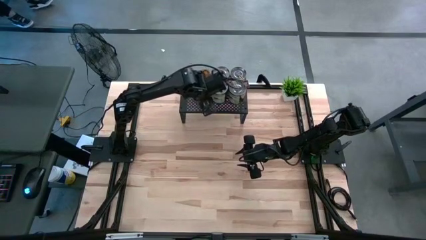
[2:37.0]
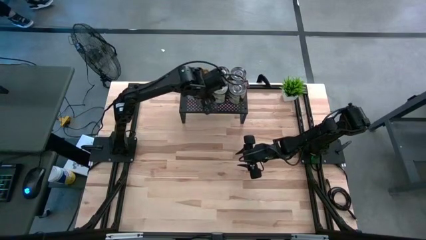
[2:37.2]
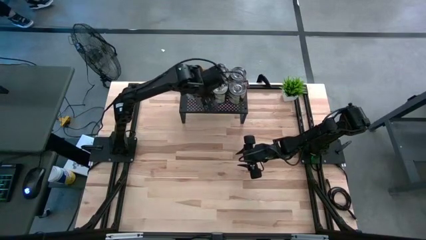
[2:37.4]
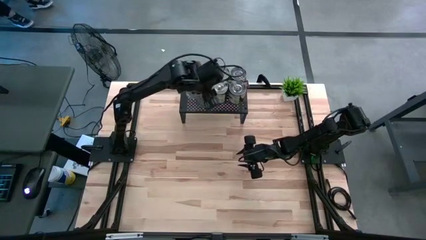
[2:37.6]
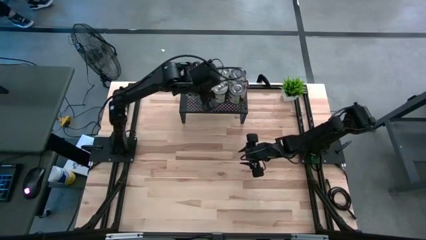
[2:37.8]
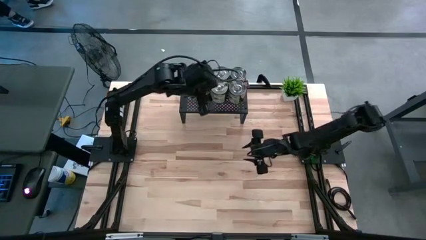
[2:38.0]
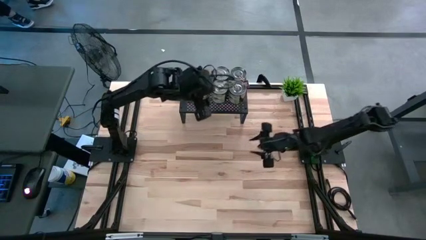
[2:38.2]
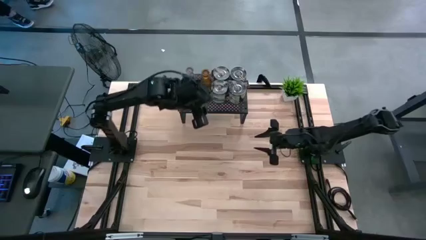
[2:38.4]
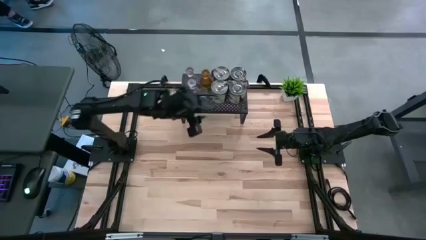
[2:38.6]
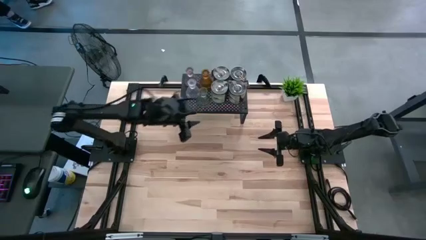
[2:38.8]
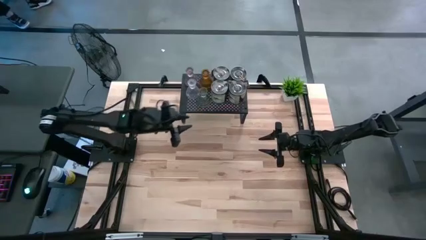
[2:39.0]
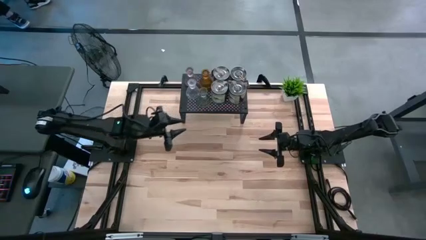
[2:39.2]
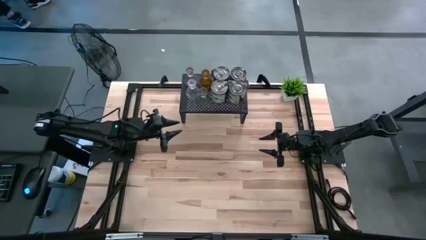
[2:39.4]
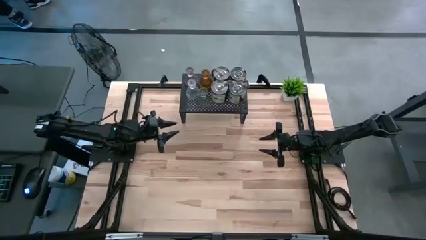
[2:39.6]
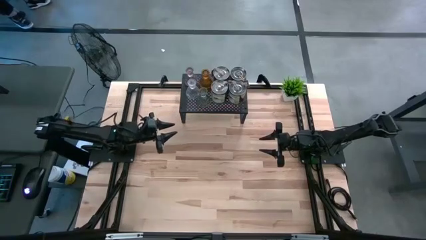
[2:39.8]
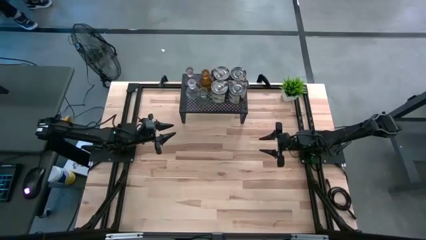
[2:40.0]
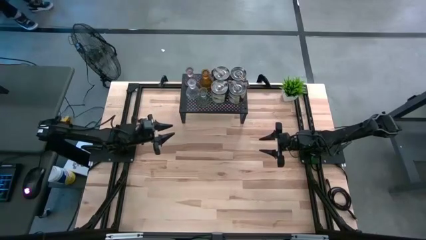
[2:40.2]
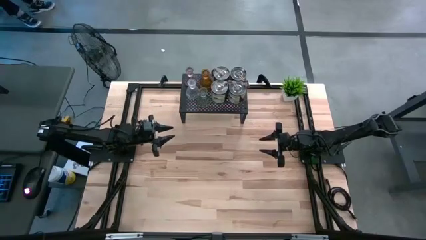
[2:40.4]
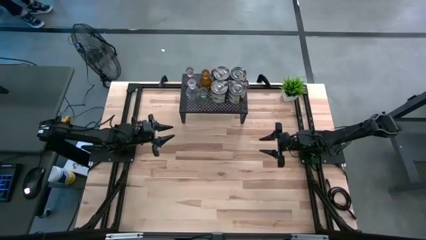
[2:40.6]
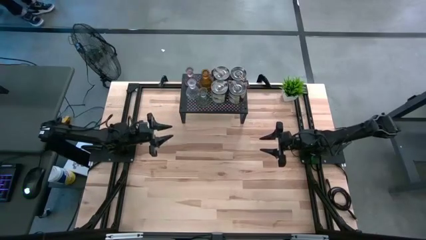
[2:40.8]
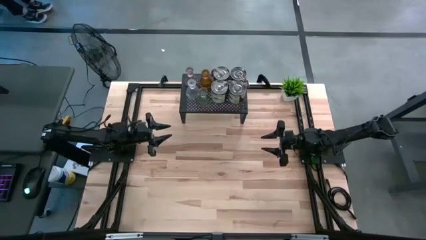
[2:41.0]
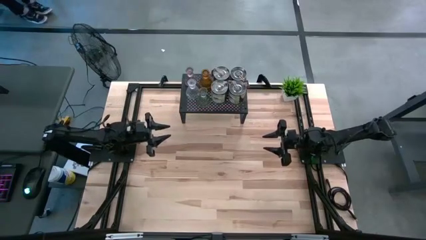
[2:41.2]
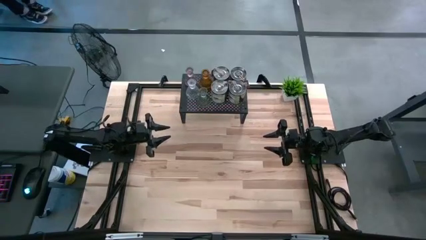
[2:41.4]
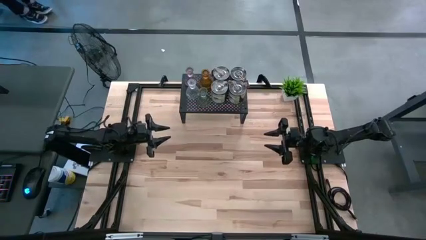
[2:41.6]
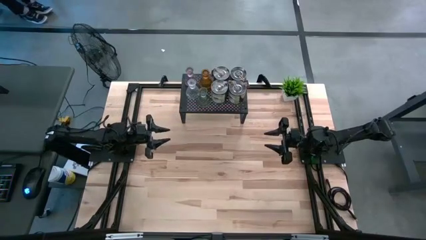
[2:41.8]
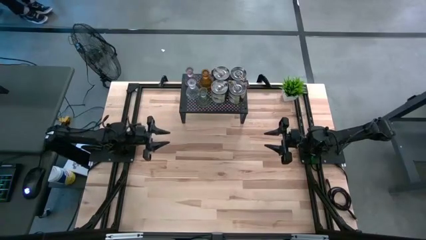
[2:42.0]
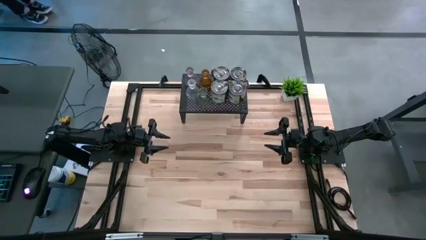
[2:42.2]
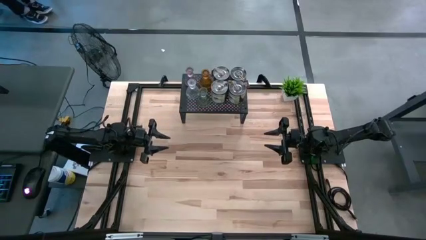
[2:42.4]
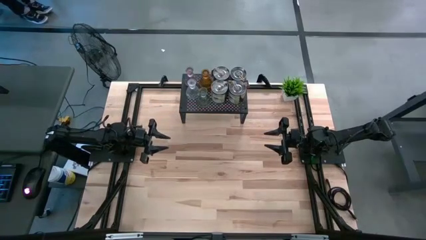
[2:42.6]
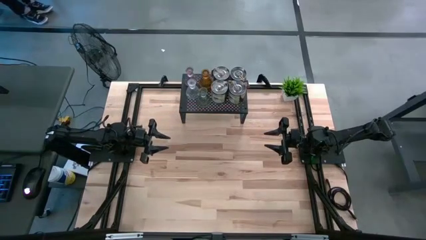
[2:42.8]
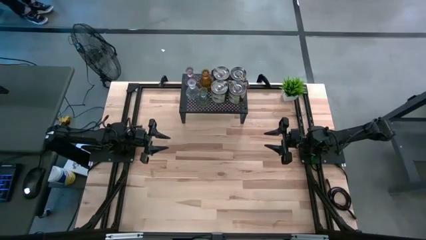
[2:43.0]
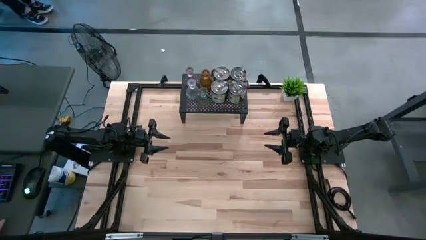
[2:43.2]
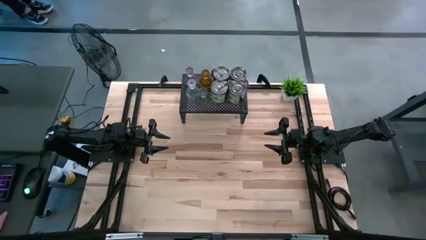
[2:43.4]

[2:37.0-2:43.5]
Task: Pick & Place candle stick holders
Return to Home Position

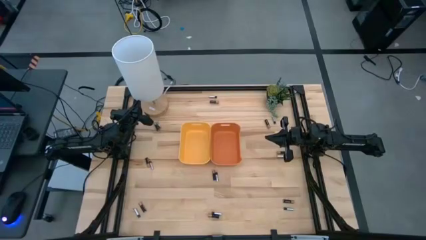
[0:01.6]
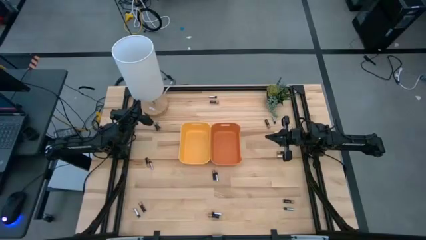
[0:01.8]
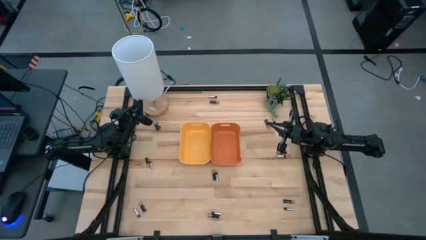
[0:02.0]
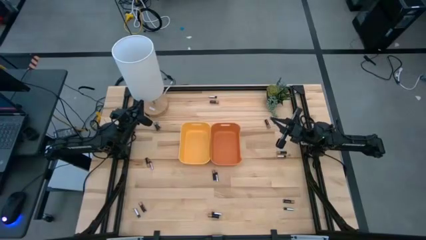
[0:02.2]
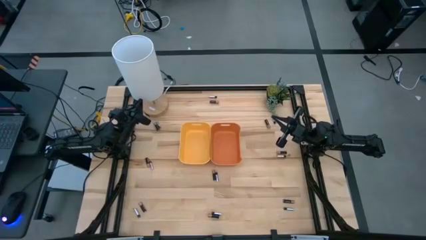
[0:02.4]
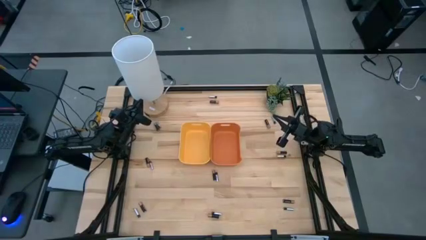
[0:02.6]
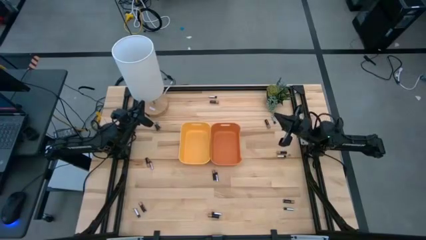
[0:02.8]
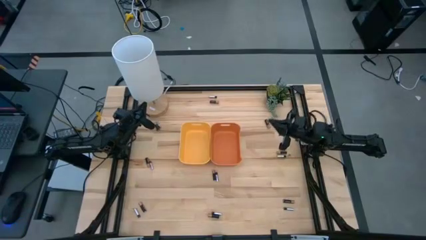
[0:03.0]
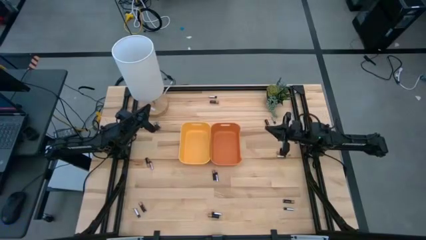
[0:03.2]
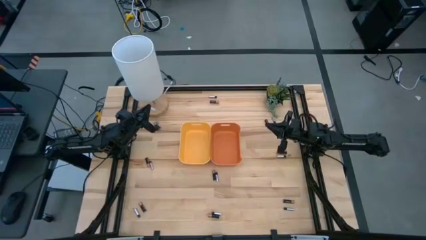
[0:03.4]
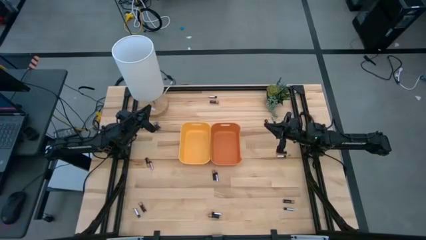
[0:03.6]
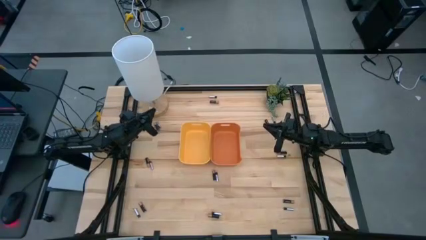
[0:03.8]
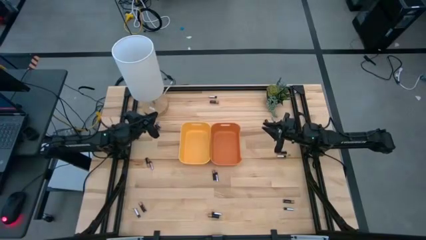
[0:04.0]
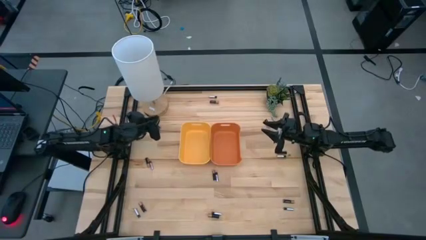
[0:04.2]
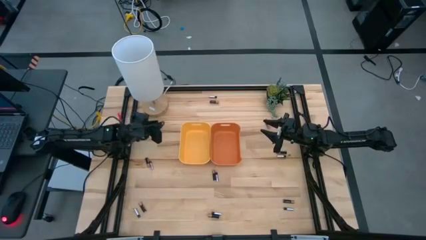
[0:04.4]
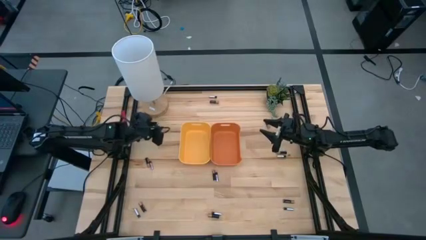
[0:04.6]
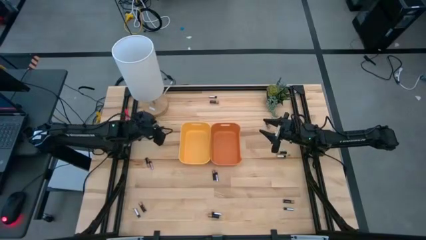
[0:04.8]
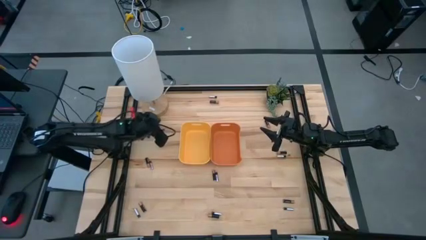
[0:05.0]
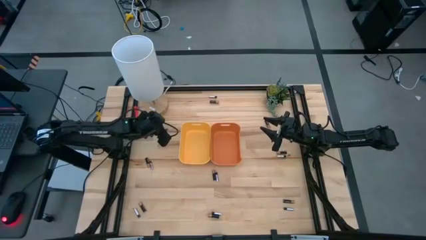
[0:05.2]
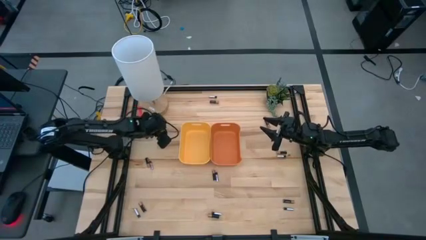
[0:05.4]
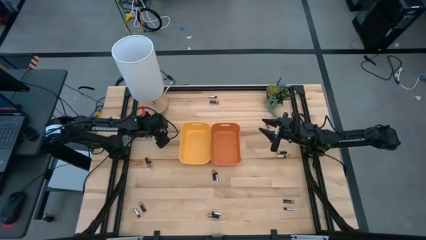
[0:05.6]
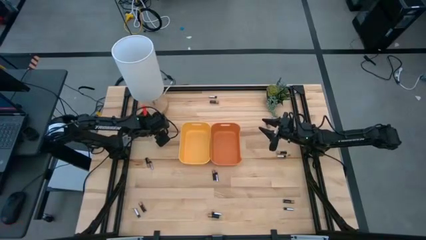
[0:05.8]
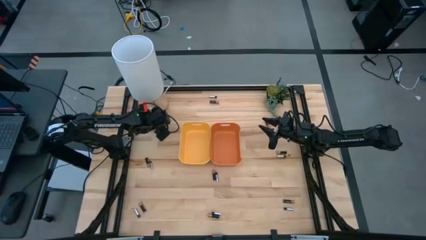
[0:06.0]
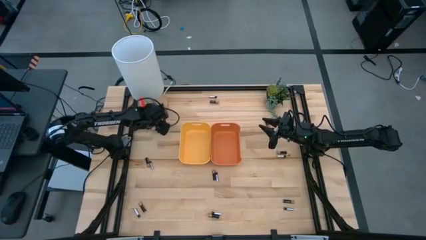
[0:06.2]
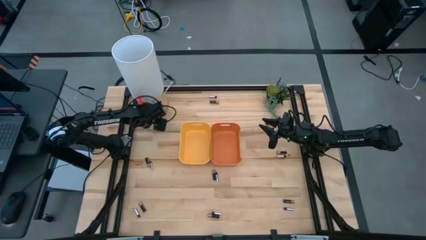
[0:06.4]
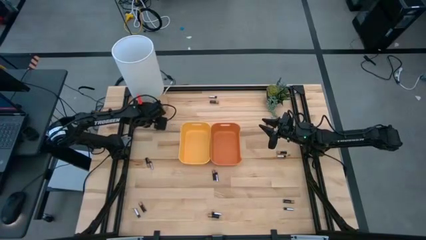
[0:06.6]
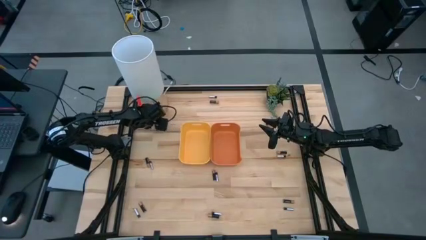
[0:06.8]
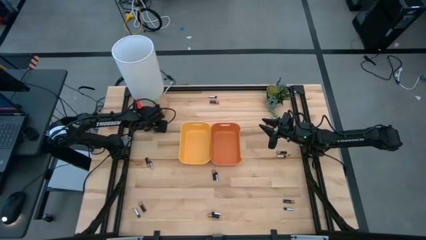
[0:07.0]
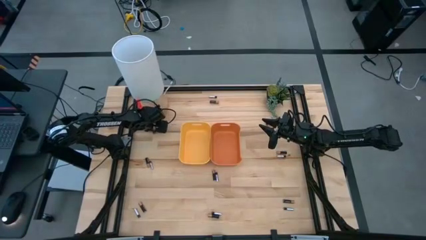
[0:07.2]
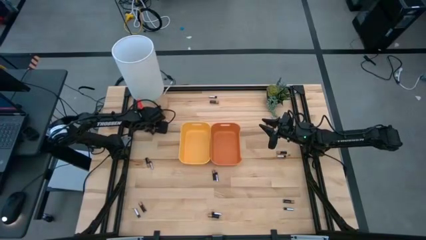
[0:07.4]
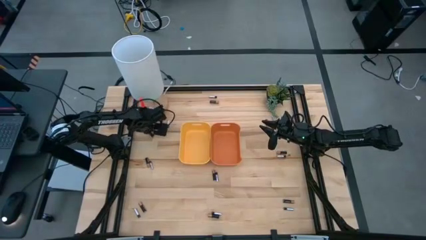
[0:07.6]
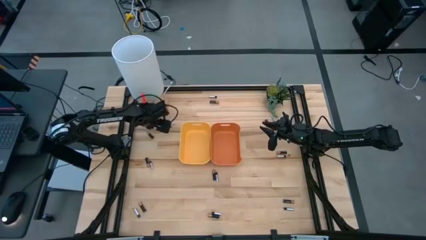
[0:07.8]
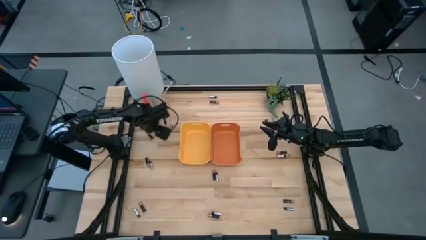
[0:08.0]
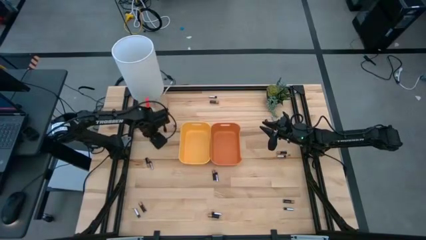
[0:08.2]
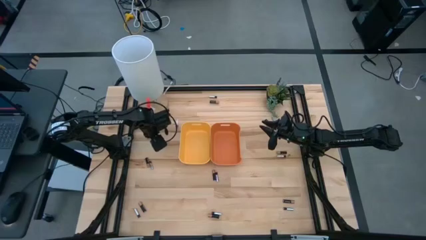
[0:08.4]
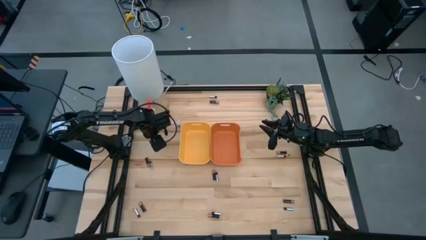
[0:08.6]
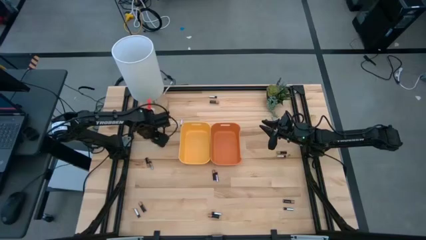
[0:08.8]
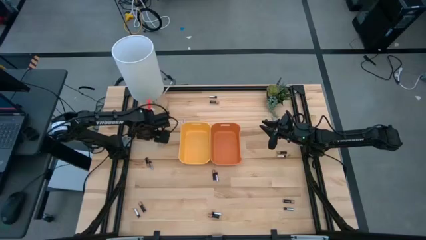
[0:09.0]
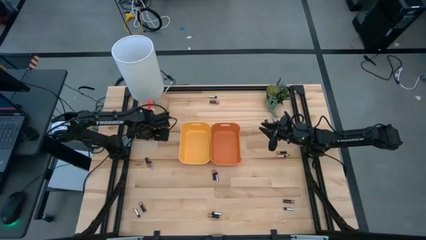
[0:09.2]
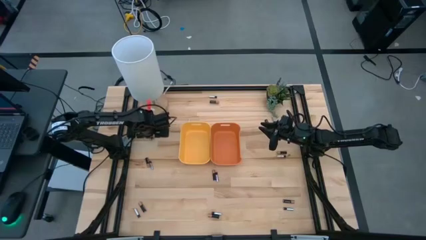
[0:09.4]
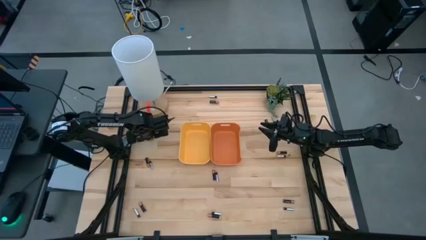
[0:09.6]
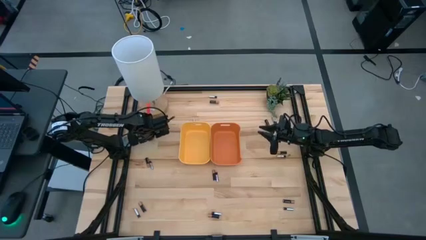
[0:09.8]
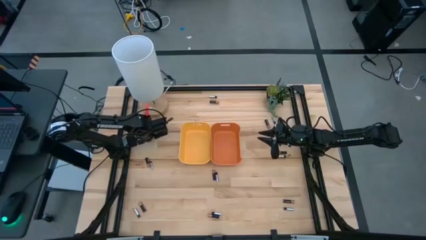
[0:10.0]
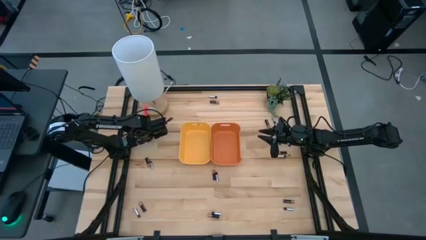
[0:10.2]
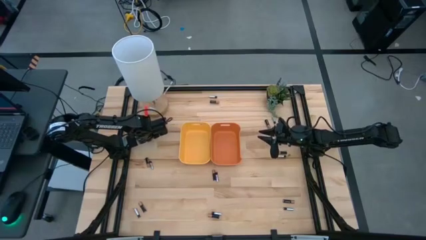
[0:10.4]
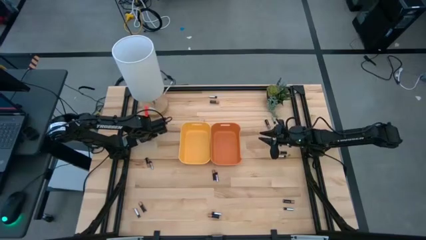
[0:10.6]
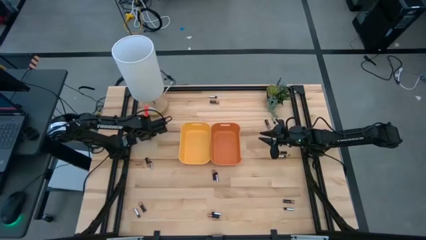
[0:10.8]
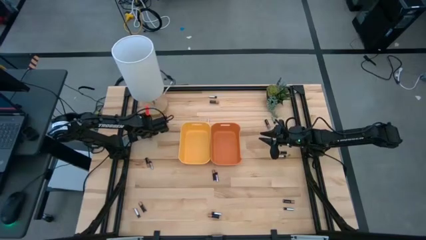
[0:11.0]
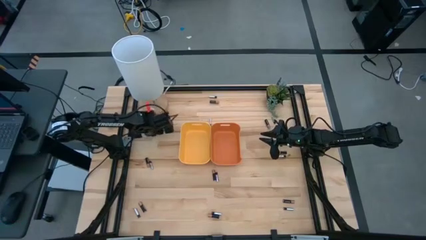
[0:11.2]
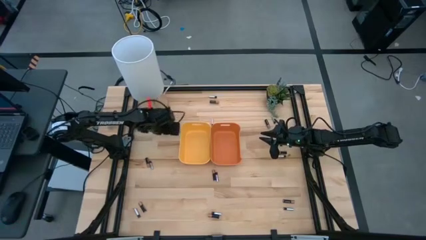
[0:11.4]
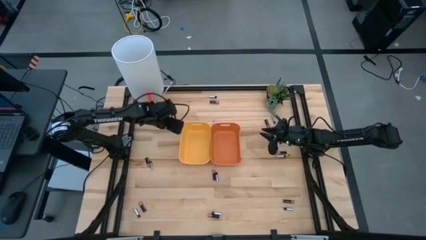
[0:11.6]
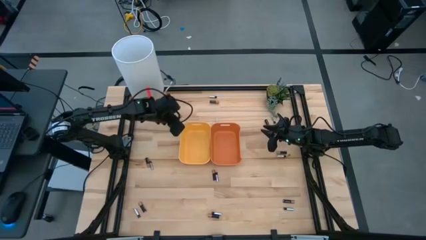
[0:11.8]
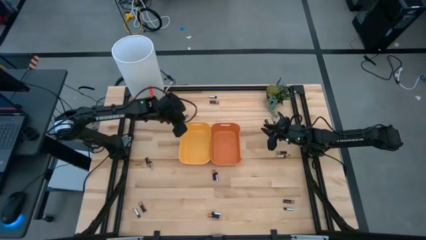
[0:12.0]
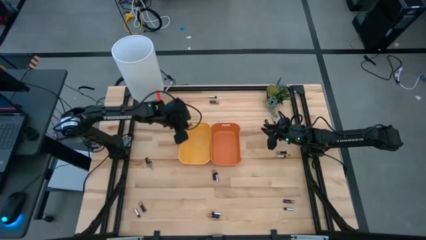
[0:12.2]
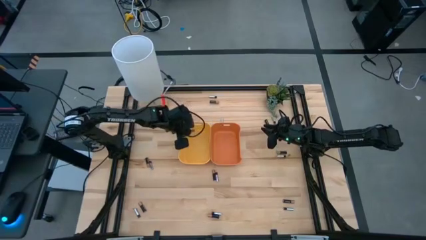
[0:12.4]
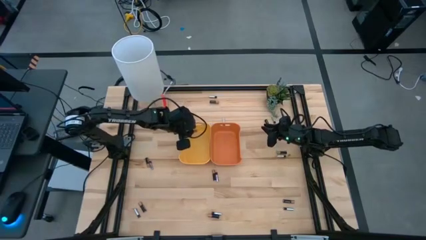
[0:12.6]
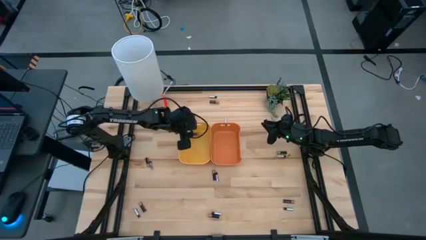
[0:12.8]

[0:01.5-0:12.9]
Task: Sort batteries
Put the top left black battery into the yellow bin
